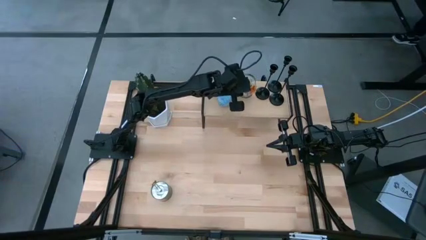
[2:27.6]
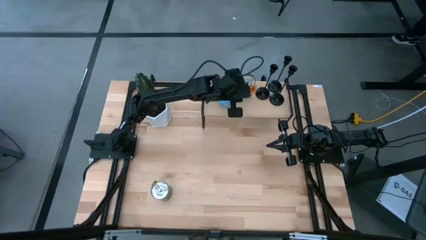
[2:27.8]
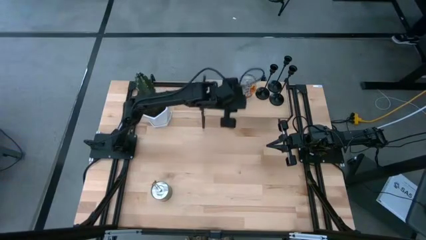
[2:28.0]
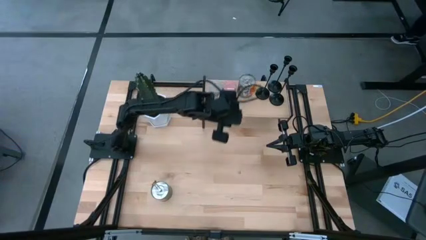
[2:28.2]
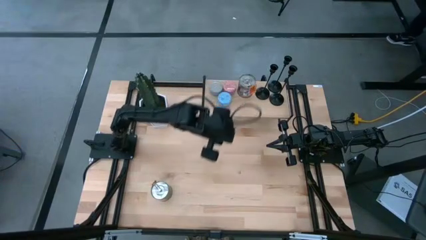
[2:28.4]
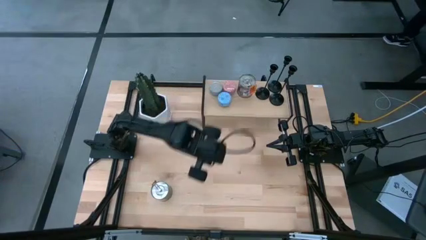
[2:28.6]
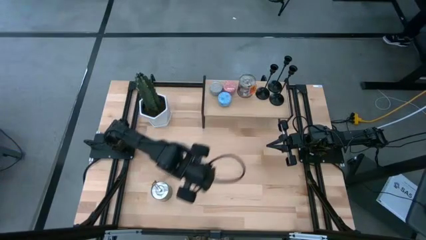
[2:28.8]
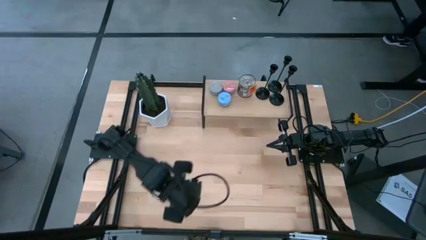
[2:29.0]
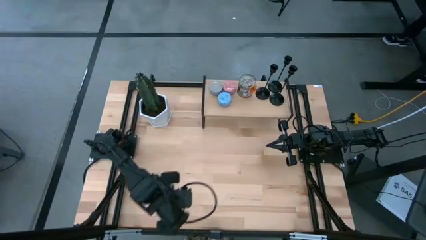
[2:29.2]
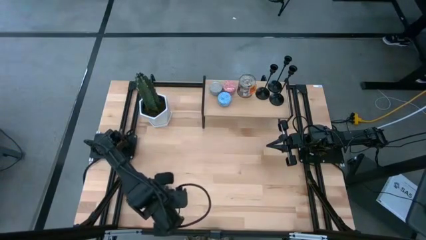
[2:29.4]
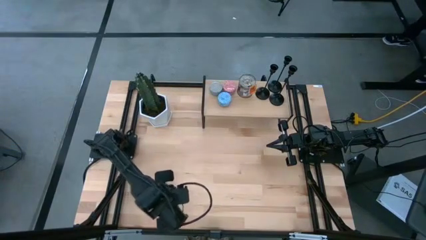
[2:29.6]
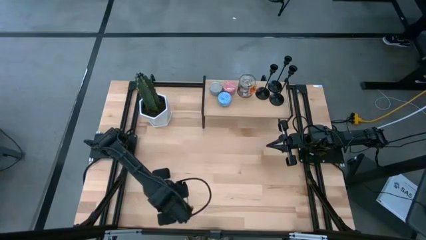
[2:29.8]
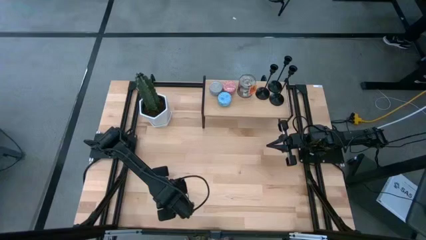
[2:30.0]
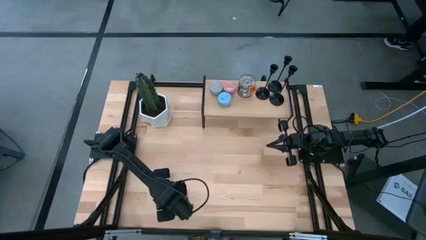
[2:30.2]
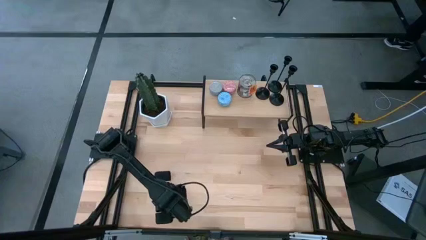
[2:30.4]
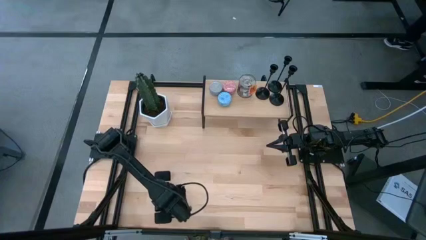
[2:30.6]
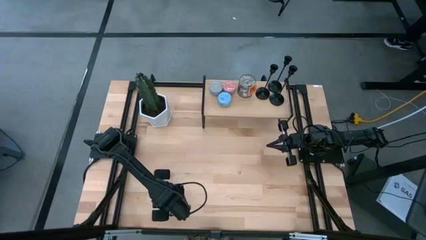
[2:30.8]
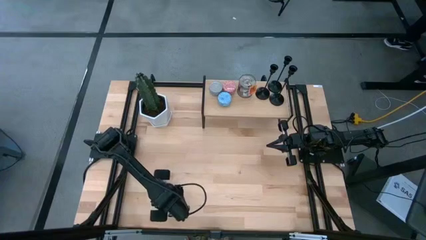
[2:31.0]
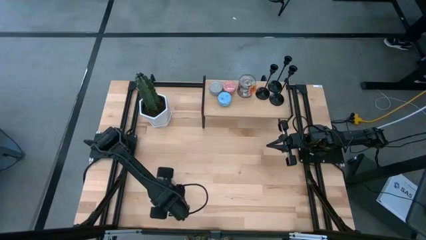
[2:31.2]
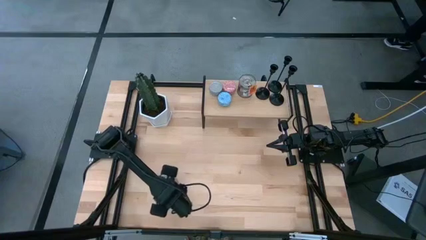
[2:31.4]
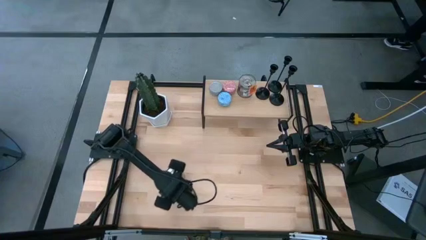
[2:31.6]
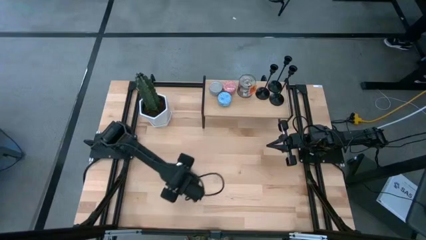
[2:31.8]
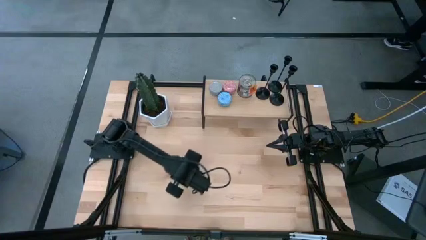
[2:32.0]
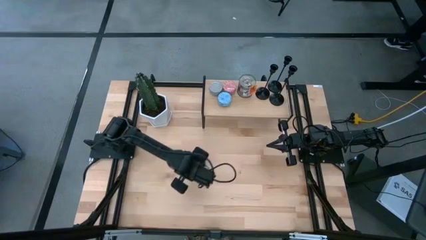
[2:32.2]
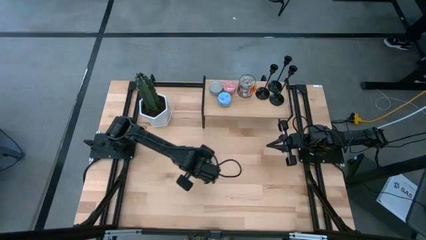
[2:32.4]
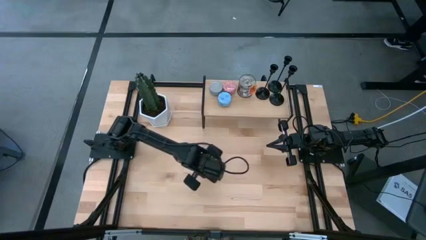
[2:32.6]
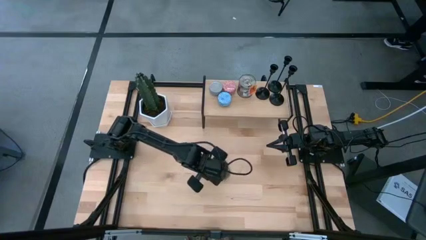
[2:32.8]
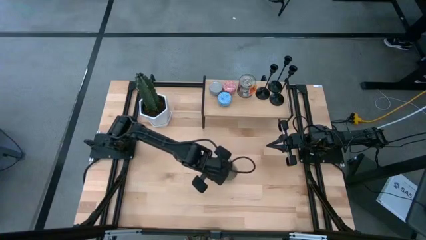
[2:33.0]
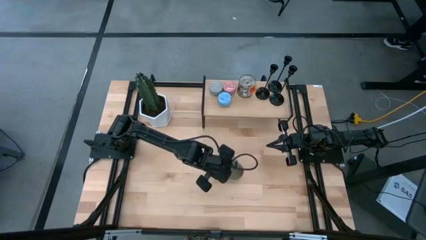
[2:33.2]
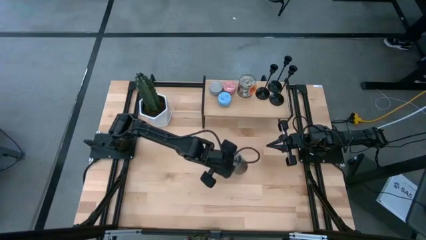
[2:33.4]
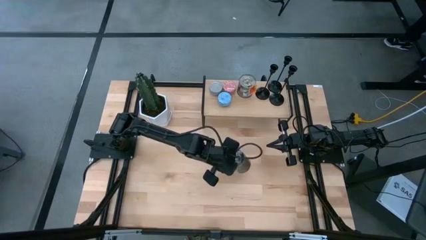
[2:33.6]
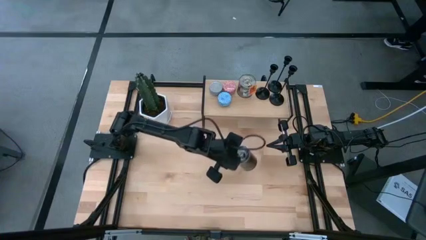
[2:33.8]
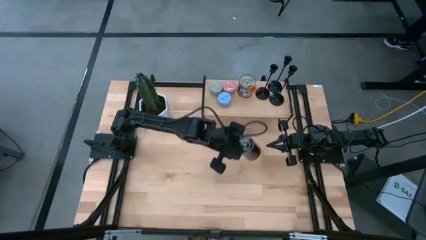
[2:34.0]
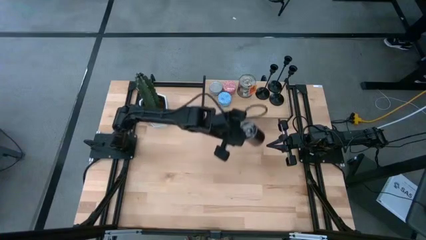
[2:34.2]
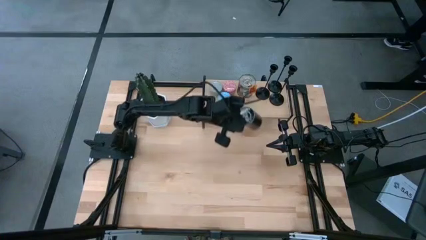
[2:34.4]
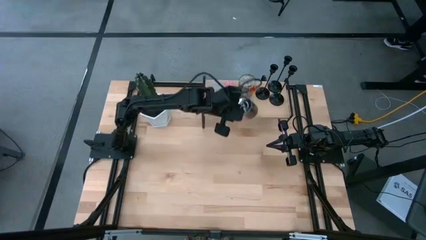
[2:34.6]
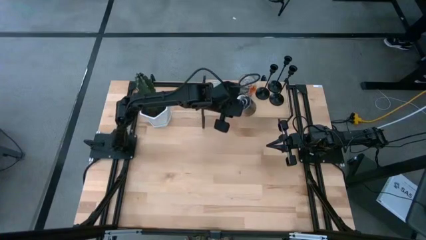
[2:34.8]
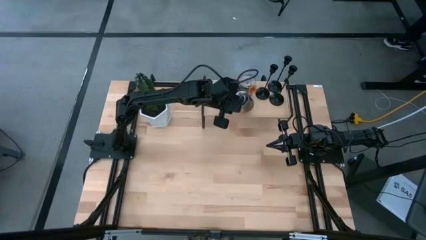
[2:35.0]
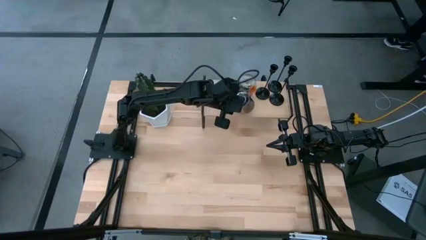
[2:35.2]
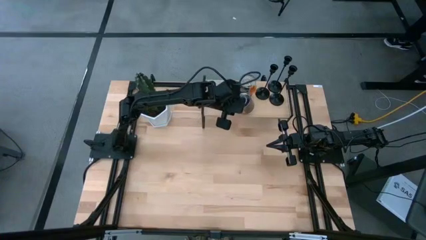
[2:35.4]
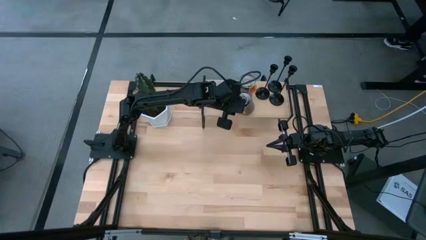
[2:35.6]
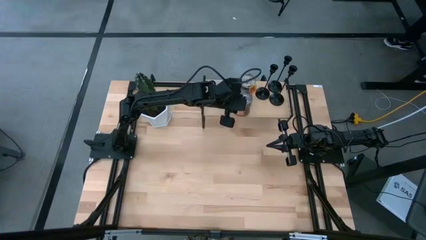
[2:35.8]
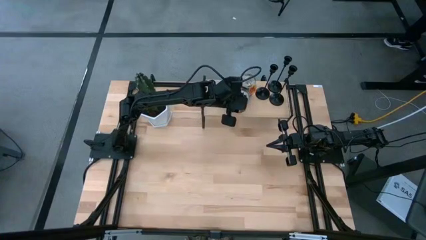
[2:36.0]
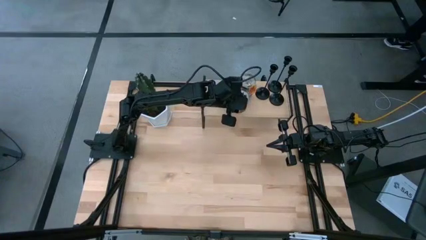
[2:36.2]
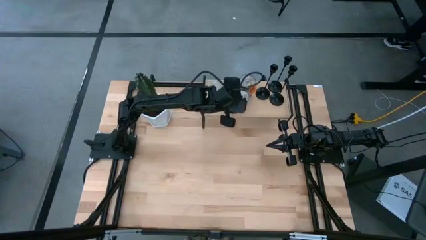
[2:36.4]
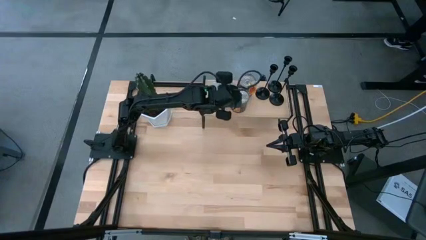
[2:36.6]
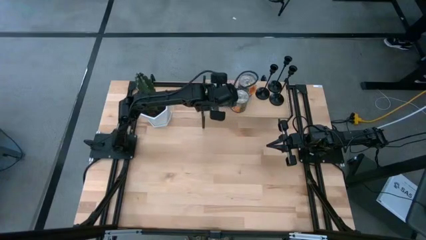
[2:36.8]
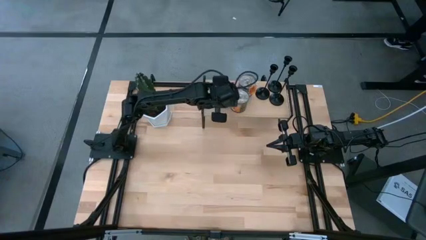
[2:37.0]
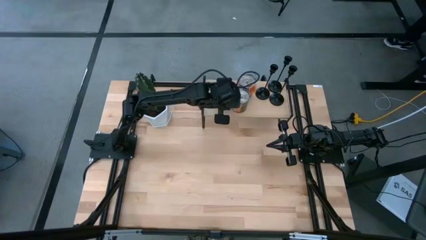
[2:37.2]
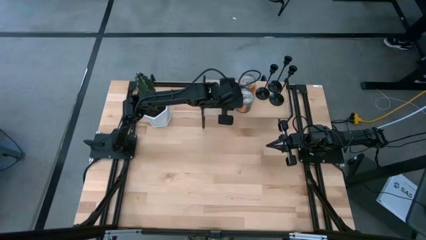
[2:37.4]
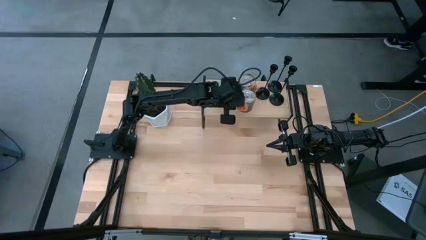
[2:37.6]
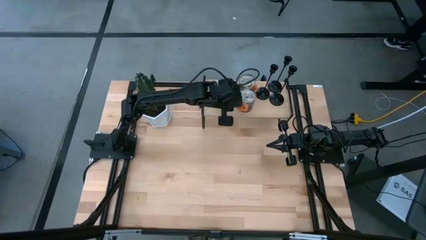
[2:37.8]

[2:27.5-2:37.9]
Task: Pick & Place candle stick holders
Put the orange scented candle on the shelf

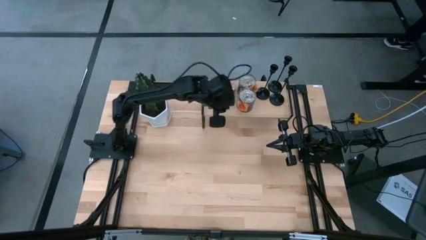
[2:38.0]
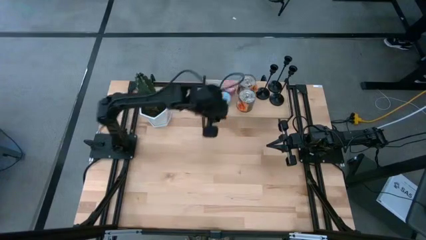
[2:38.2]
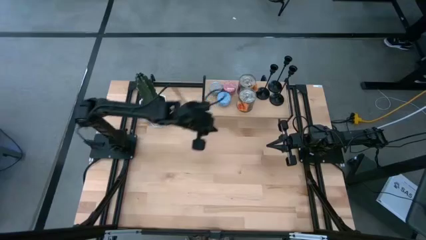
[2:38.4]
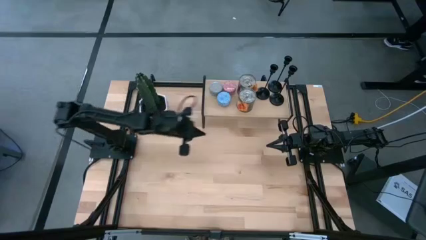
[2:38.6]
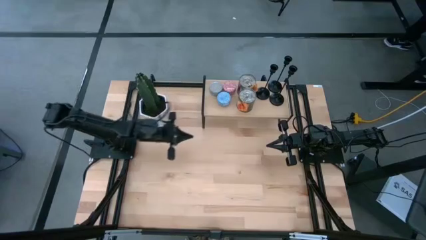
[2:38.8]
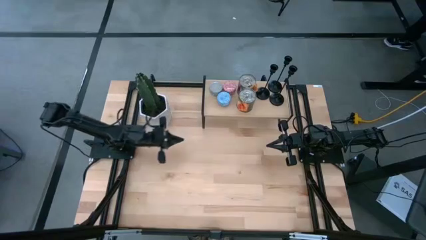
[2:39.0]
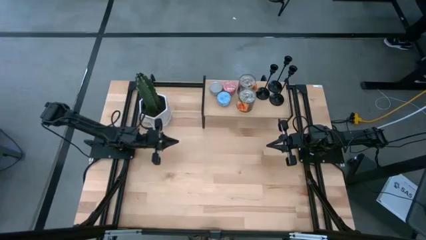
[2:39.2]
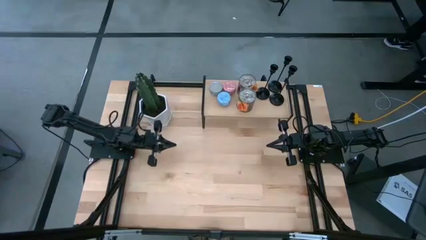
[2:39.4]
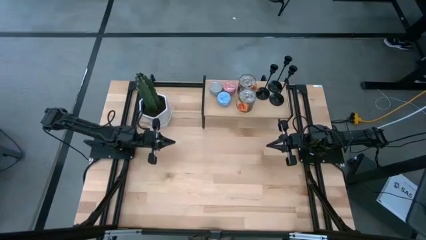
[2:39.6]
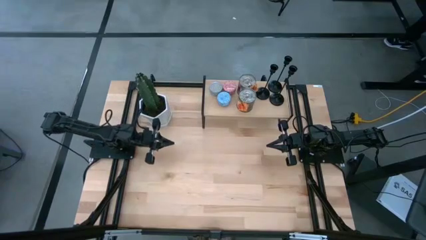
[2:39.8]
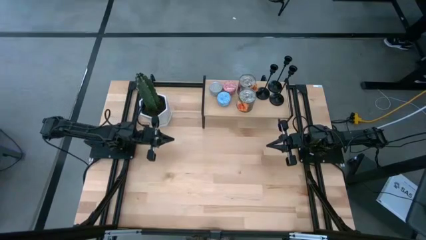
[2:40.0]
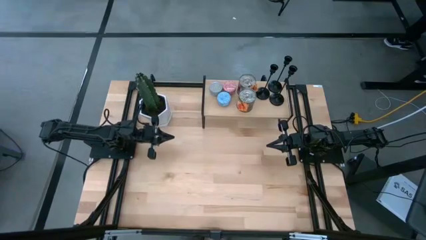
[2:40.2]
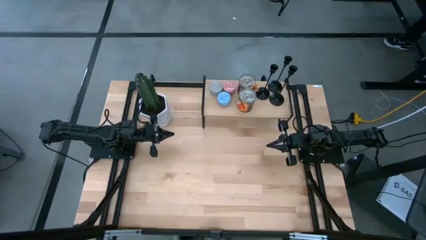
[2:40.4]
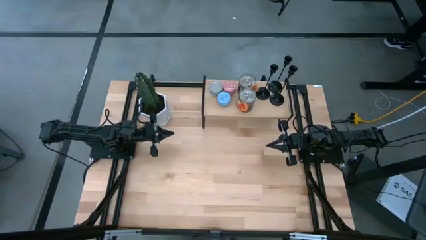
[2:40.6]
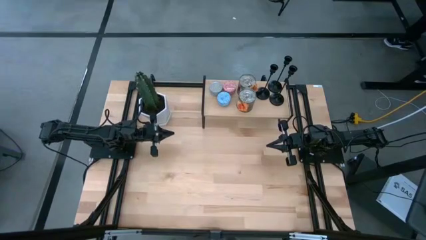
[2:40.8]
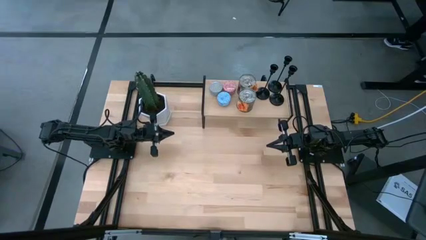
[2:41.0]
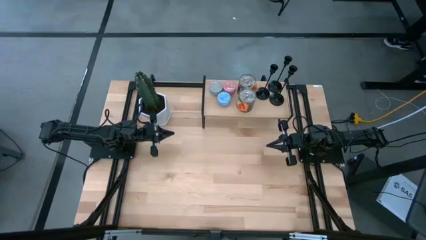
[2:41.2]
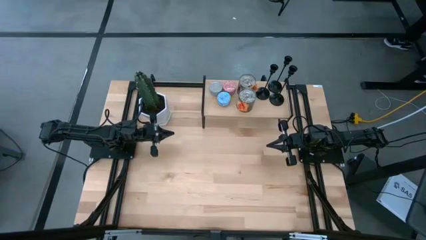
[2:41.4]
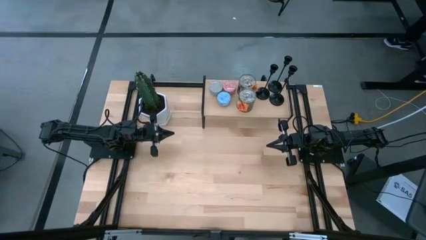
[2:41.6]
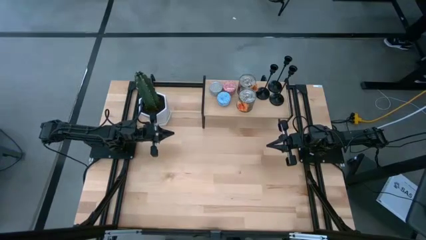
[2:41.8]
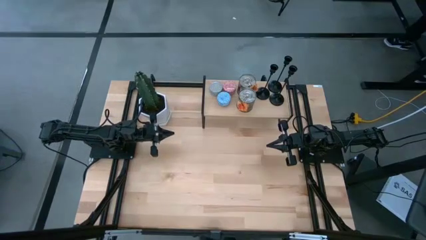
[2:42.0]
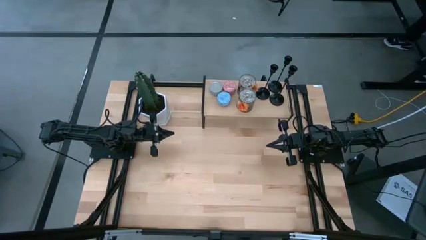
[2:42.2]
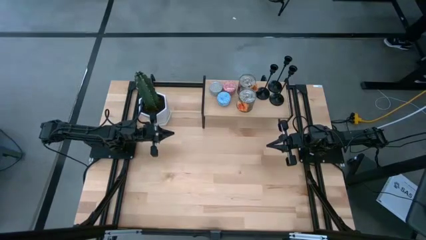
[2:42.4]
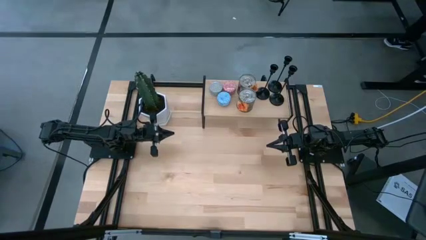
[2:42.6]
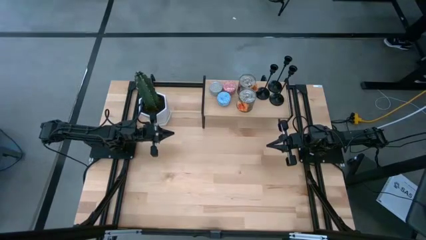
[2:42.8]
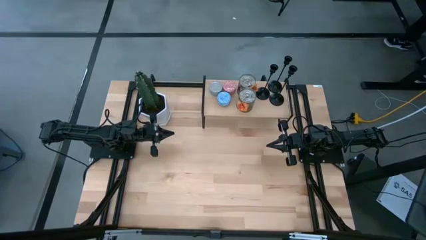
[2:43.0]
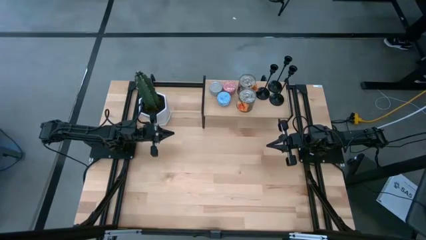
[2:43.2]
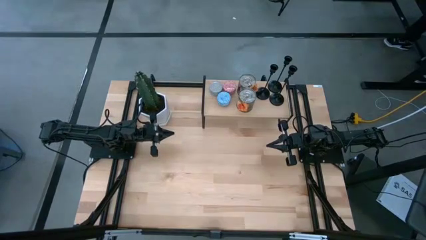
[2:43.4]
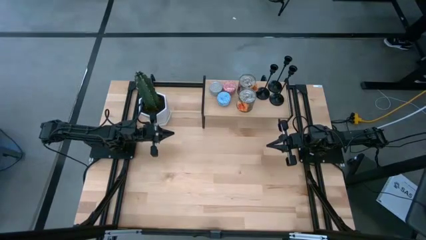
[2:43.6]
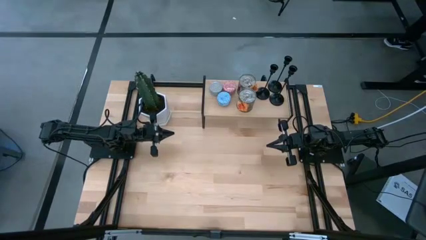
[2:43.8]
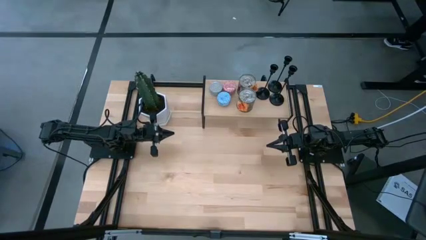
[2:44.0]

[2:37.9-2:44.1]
Return to Home Position

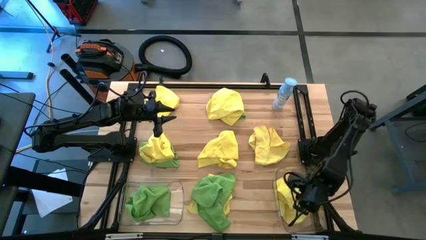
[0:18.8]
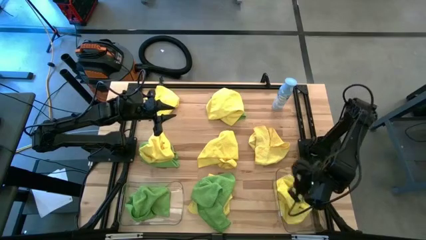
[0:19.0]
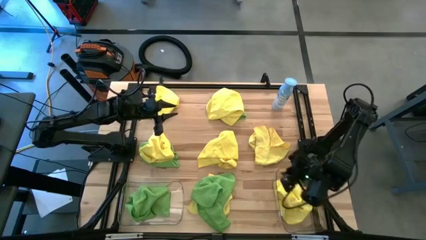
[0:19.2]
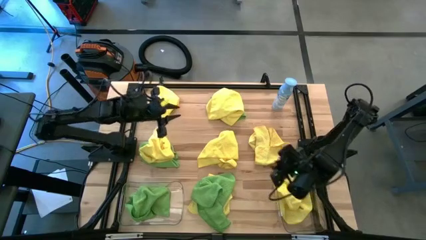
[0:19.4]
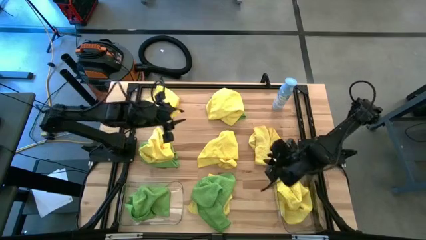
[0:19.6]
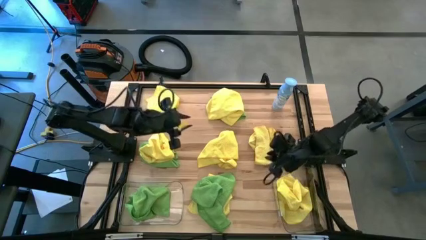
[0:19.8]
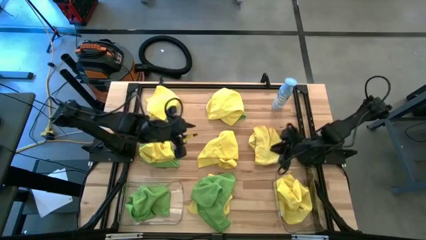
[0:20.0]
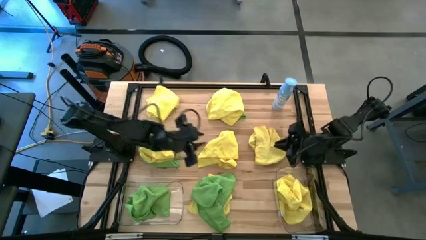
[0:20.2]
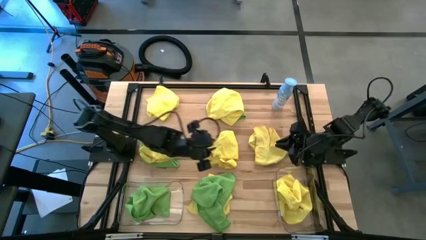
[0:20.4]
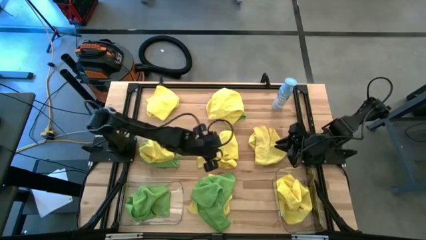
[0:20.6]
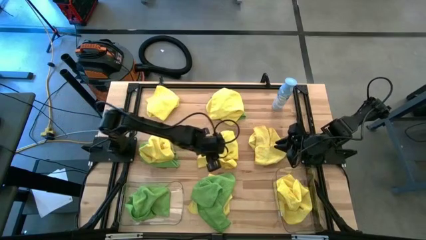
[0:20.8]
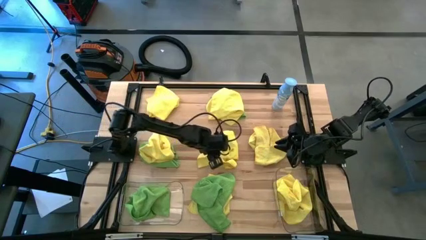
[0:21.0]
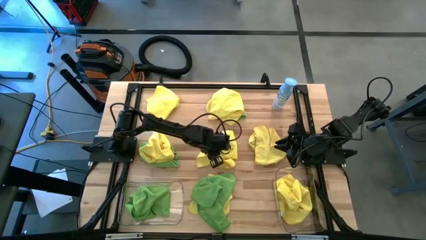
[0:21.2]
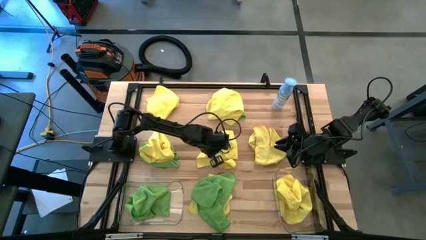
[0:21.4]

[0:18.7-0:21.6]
Task: Sort microfiber towel by color & place in baskets
Put the center yellow microfiber towel into the right transparent bin
